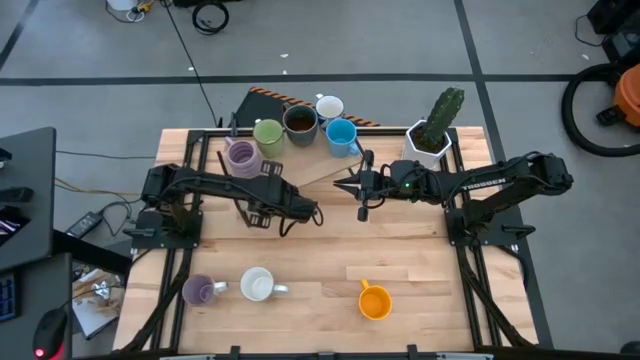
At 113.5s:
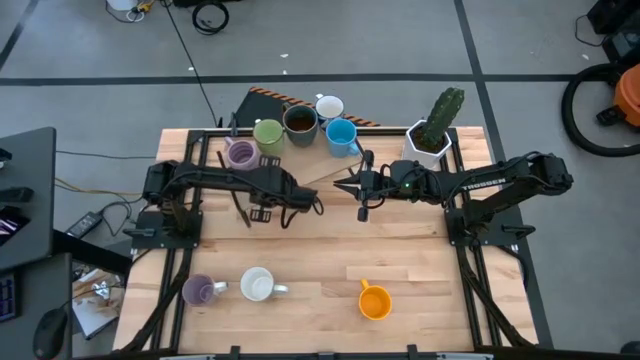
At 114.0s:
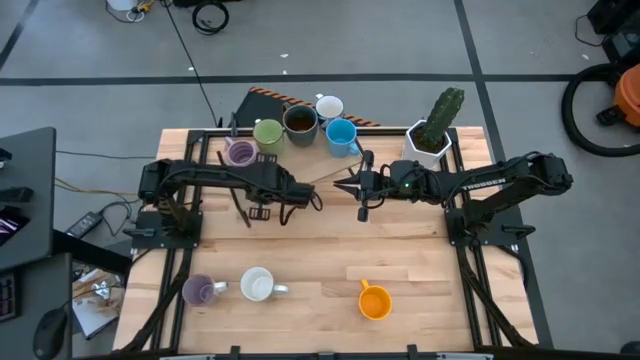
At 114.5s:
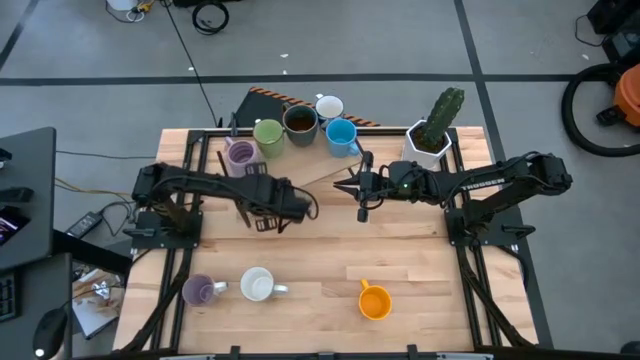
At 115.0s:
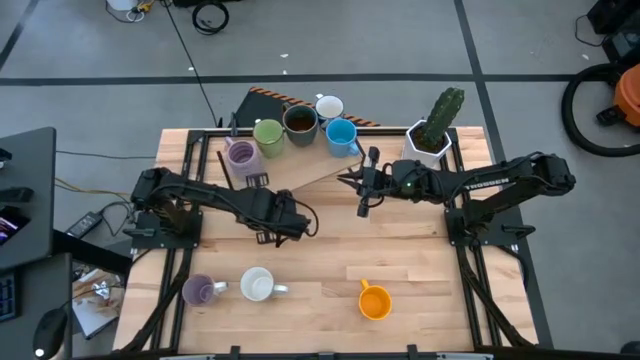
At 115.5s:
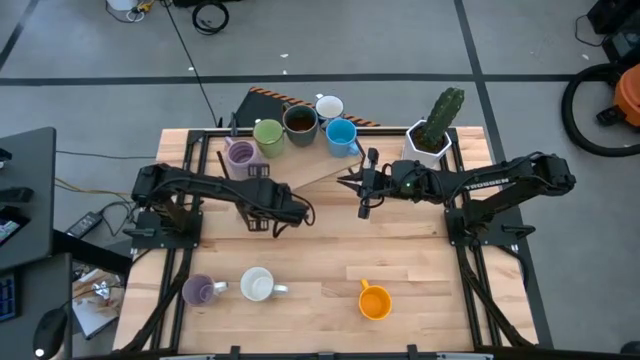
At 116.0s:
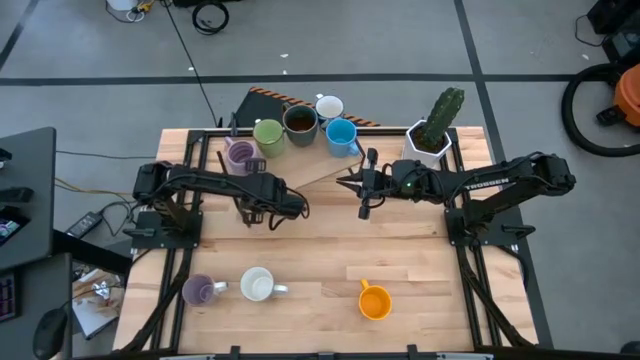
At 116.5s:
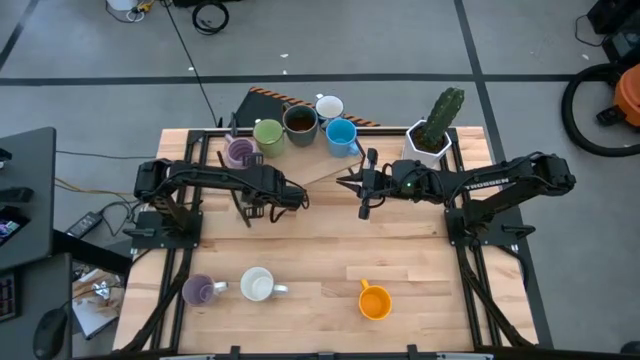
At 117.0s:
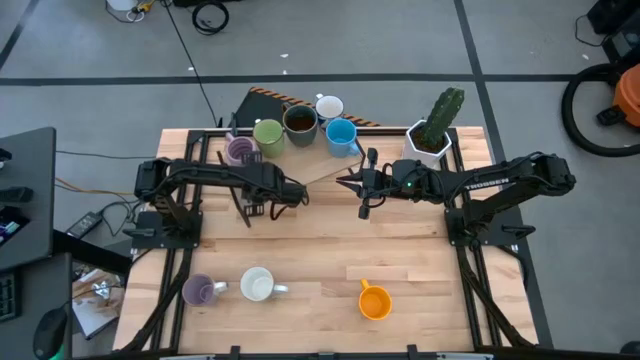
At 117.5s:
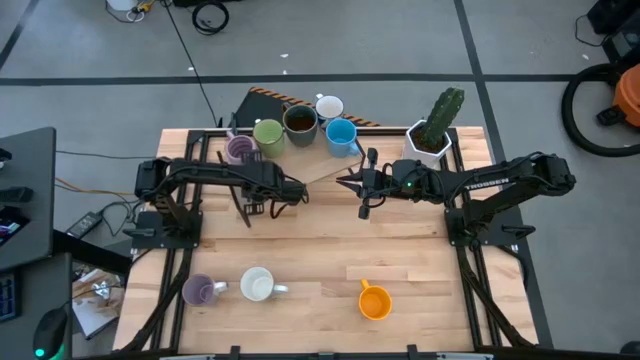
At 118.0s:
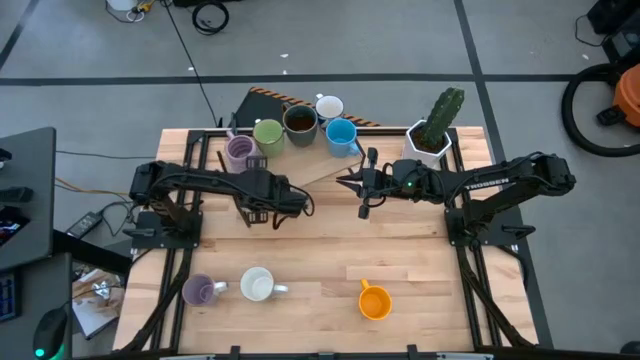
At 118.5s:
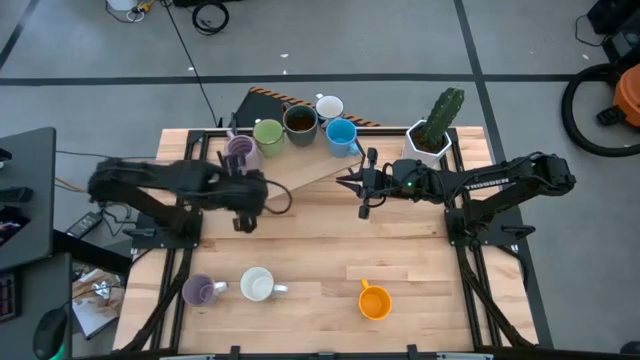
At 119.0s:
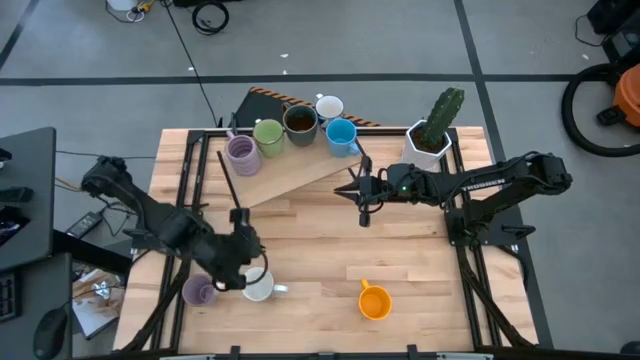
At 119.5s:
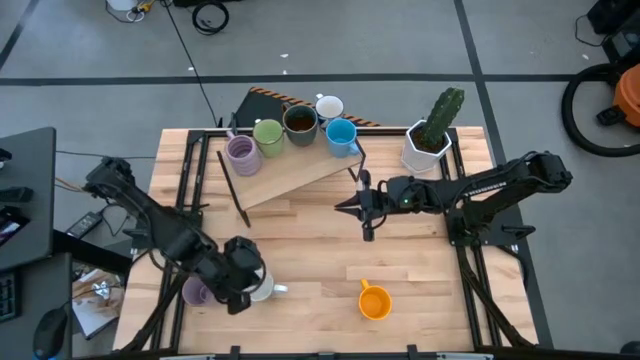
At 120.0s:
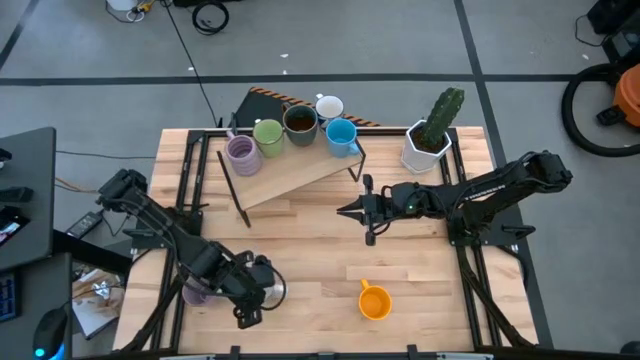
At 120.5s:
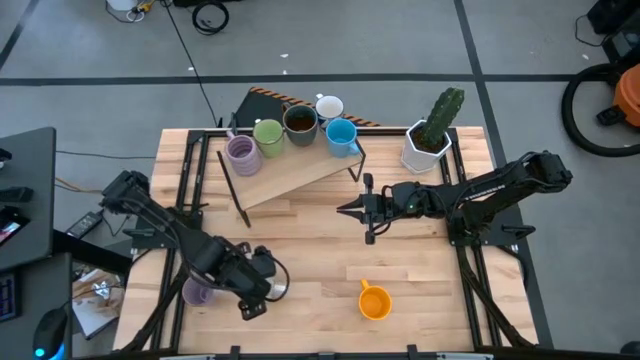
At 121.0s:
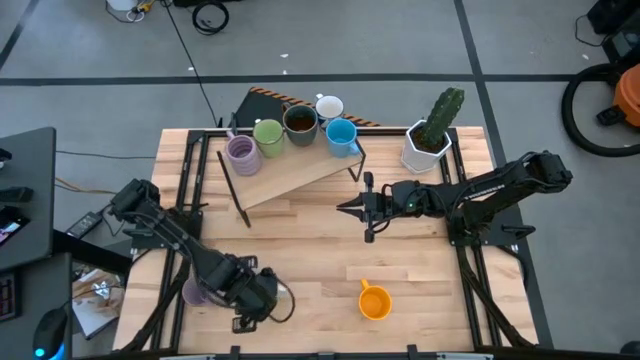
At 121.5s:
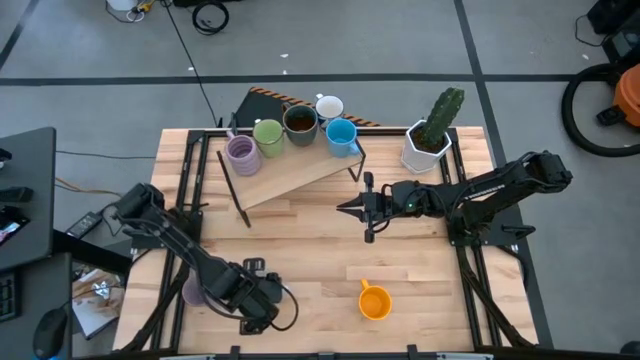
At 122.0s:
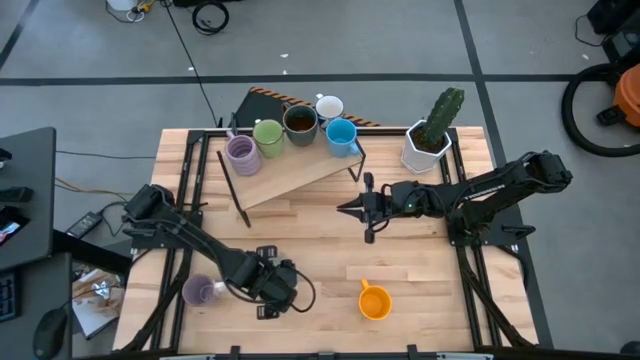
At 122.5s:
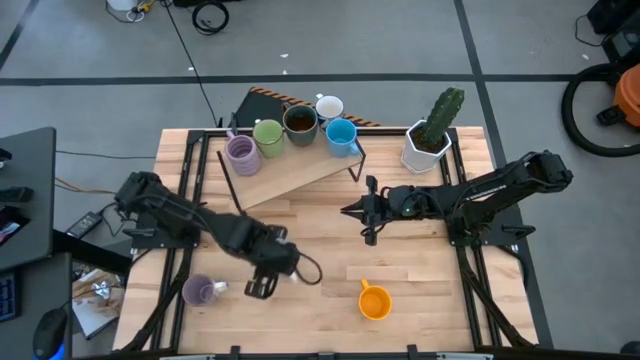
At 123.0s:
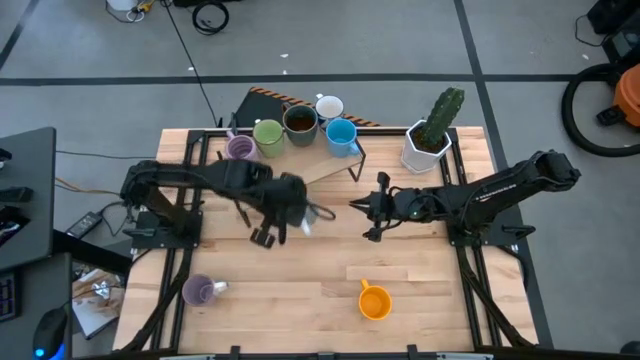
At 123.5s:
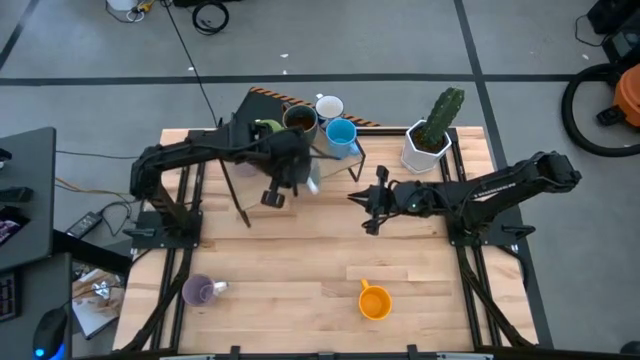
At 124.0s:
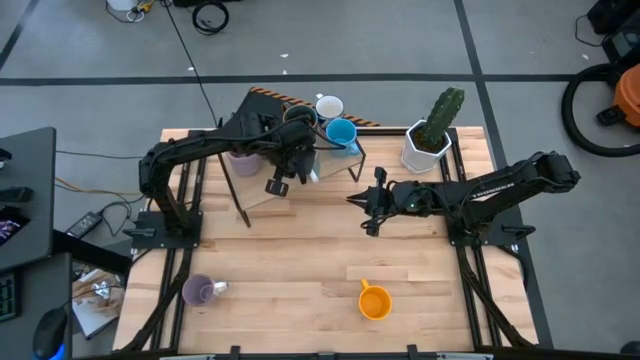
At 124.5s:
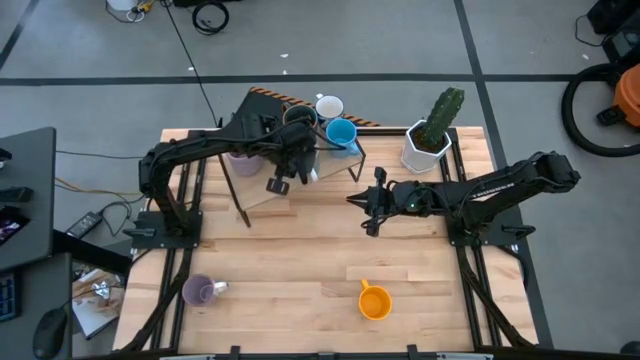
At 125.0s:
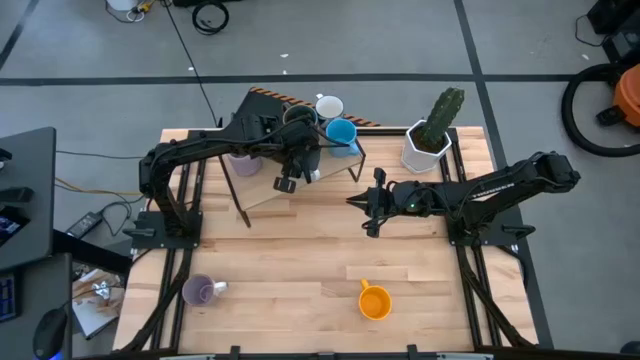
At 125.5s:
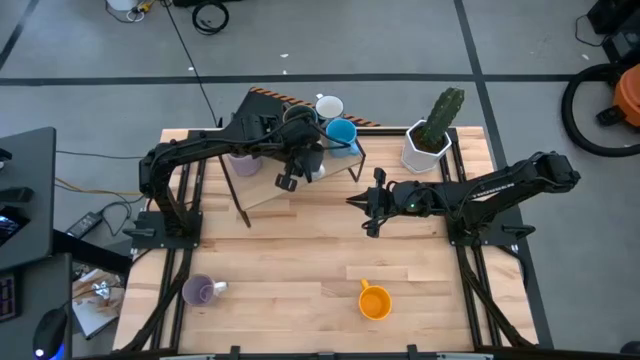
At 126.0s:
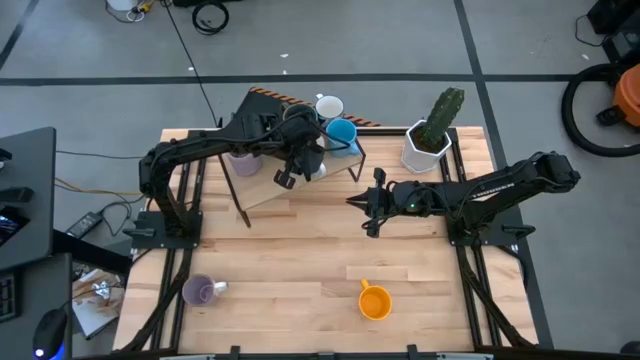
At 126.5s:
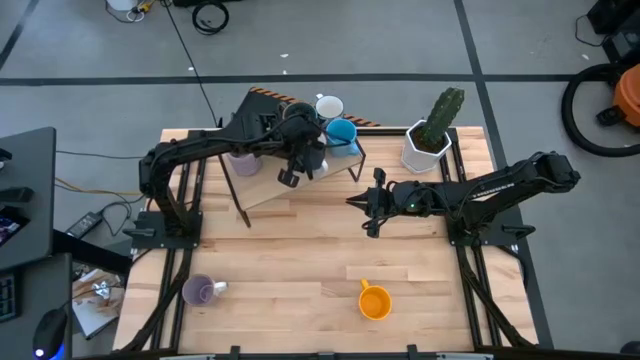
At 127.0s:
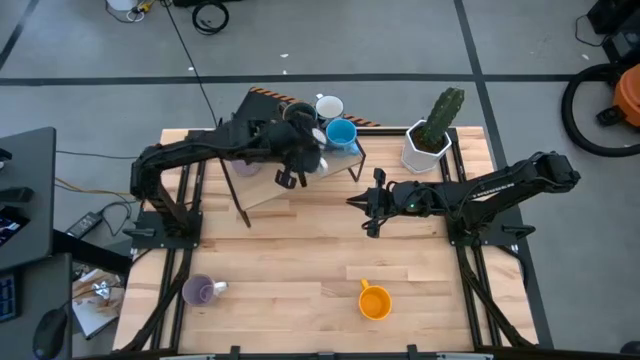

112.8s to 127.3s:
Task: Place coffee mugs
Put the blue mug on the shelf

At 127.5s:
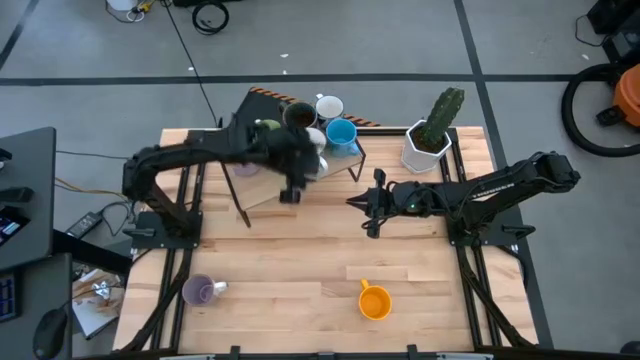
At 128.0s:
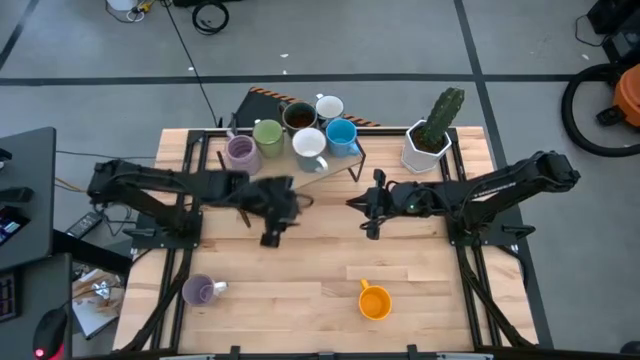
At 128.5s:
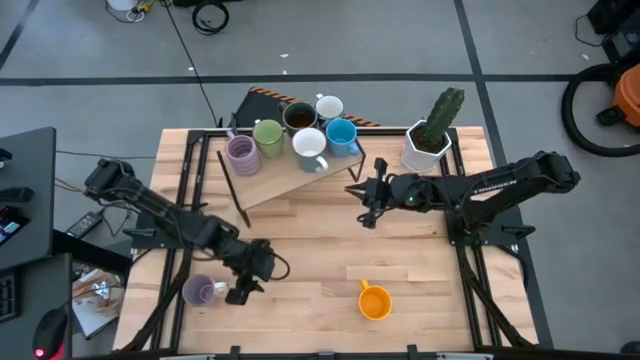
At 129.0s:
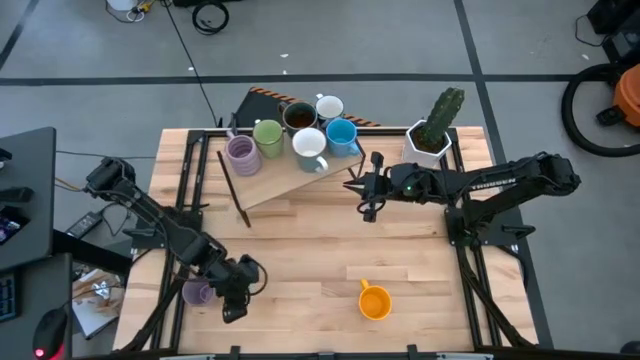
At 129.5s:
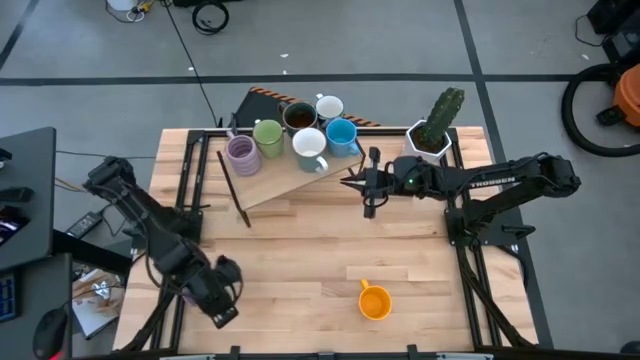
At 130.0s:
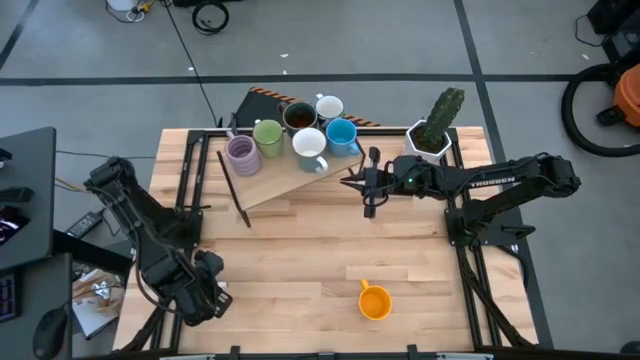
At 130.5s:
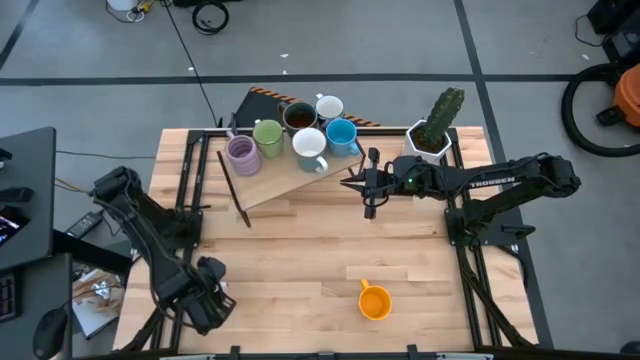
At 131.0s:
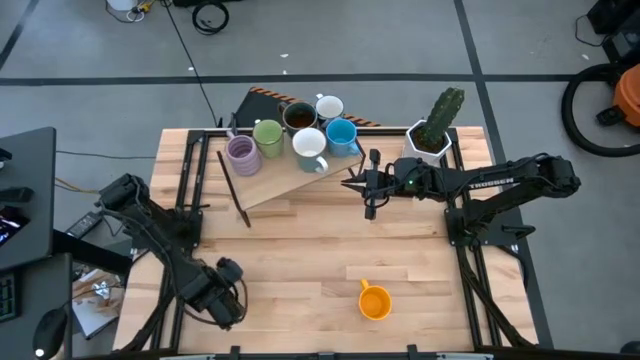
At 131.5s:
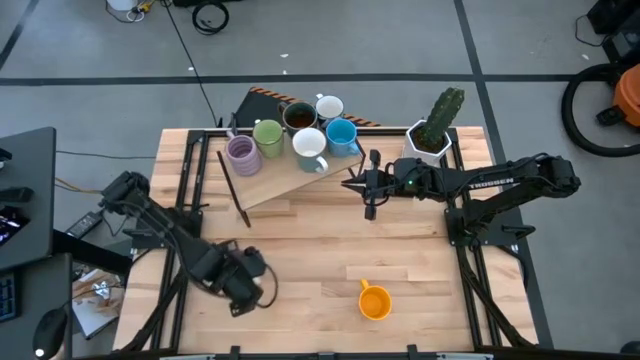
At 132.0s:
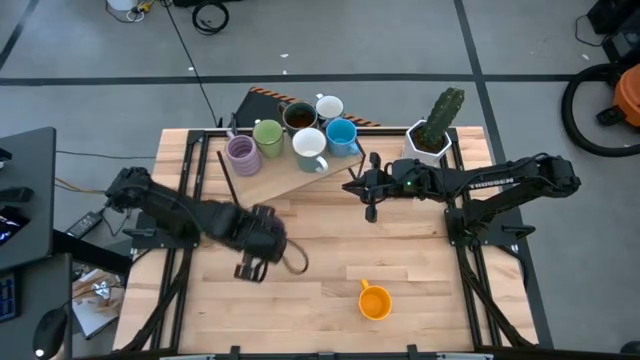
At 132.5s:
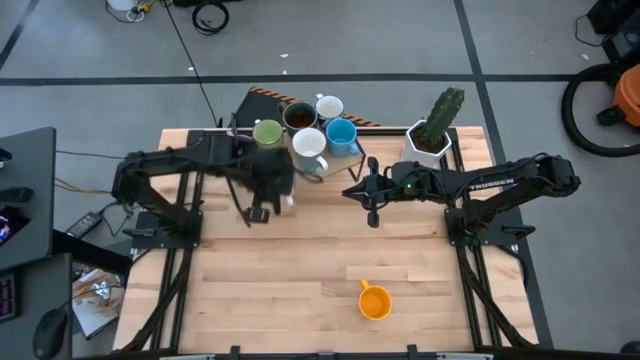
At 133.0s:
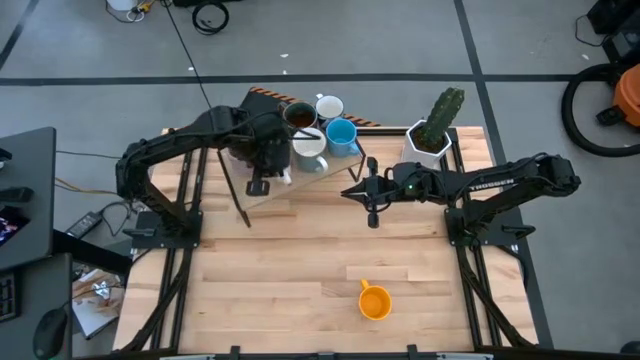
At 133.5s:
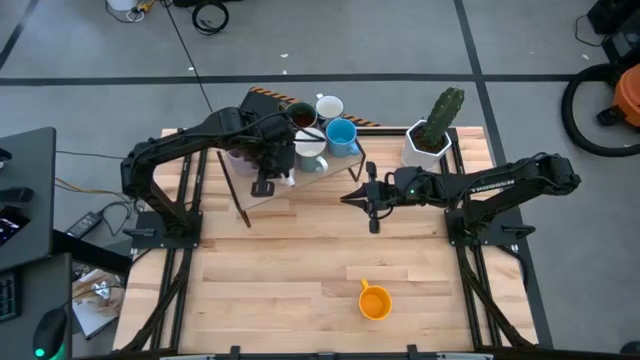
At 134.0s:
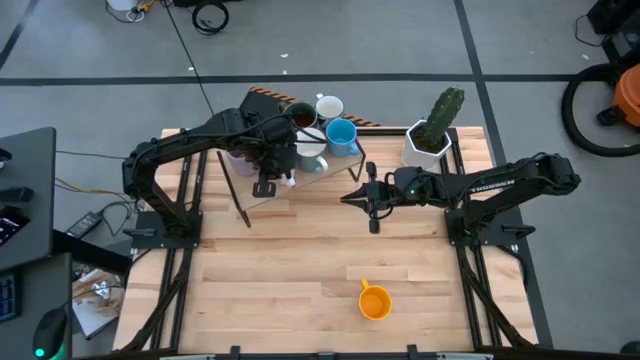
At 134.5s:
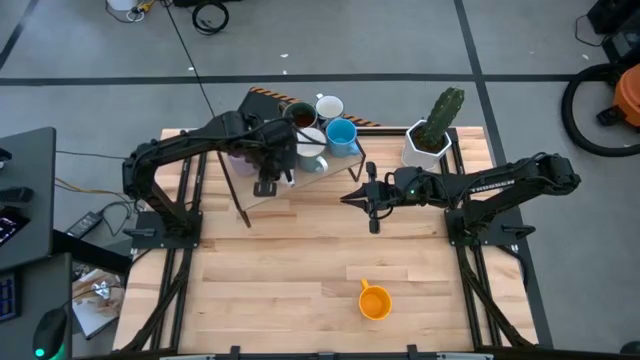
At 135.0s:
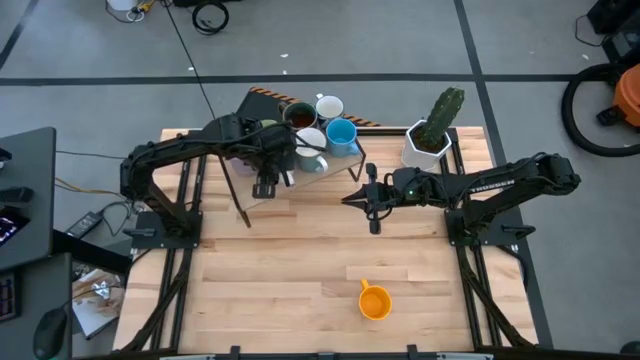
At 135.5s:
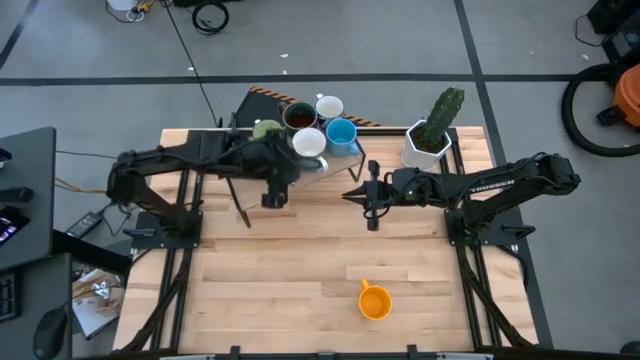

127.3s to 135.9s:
Put the stripe purple mug on the shelf
